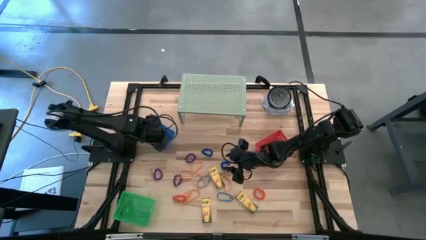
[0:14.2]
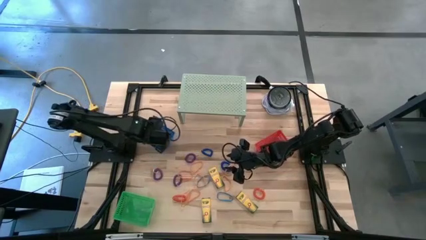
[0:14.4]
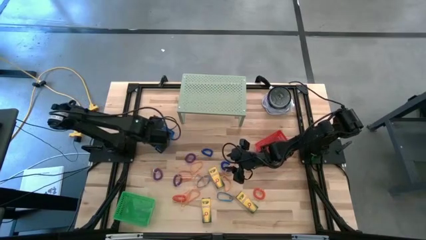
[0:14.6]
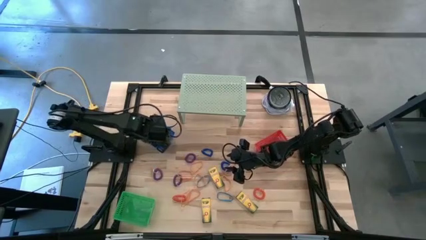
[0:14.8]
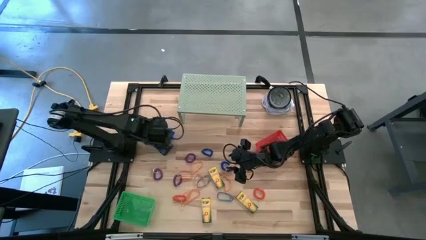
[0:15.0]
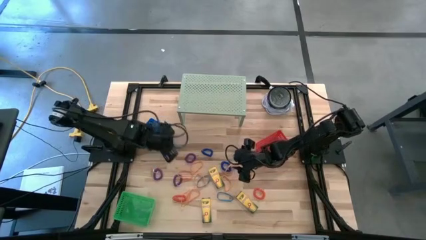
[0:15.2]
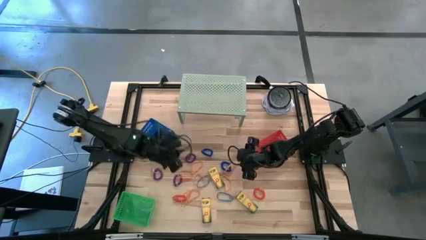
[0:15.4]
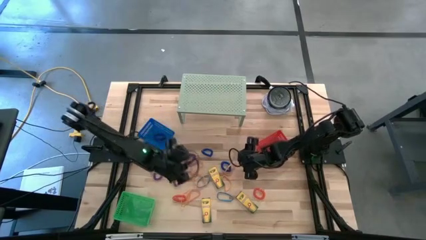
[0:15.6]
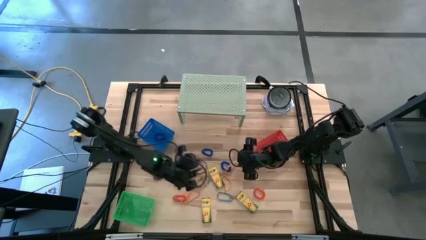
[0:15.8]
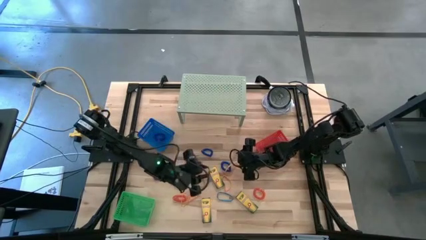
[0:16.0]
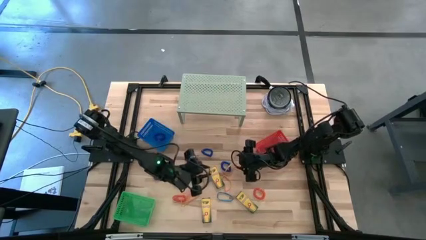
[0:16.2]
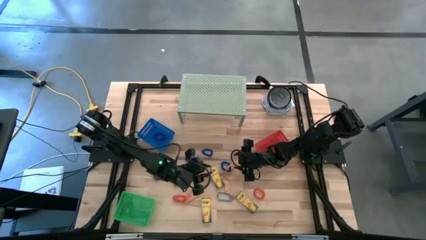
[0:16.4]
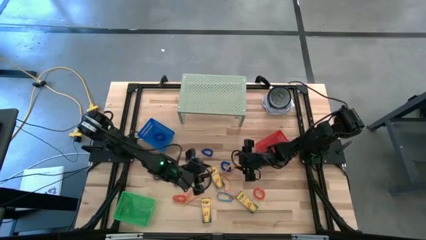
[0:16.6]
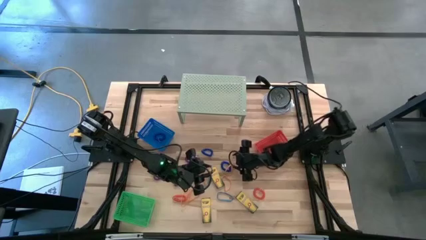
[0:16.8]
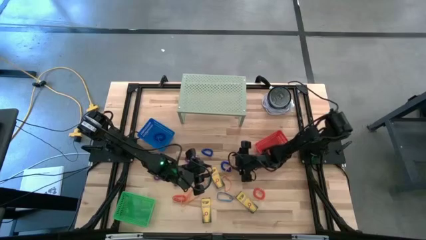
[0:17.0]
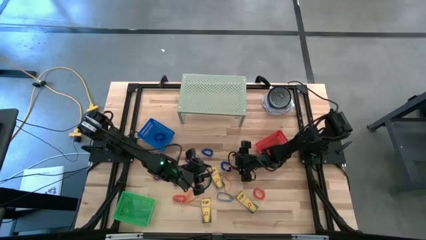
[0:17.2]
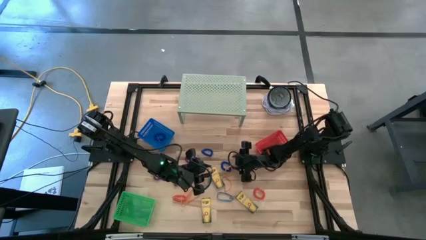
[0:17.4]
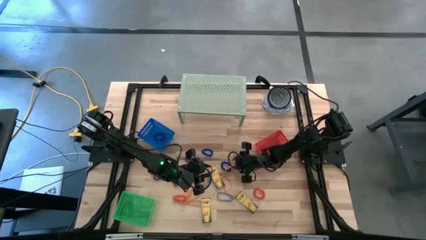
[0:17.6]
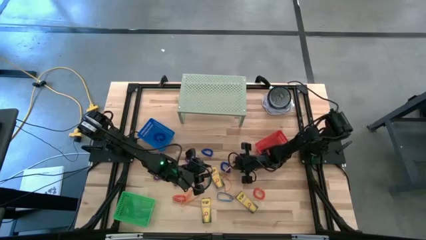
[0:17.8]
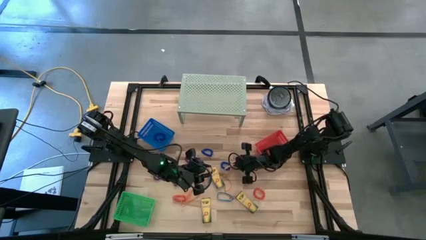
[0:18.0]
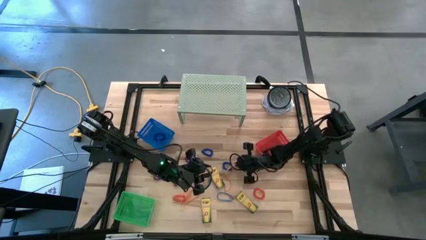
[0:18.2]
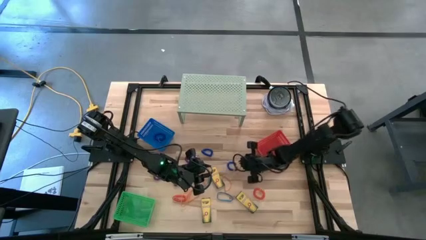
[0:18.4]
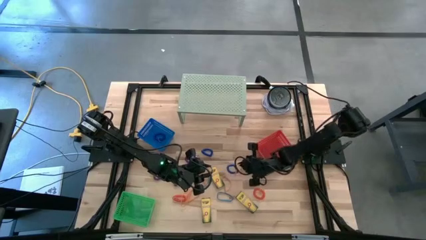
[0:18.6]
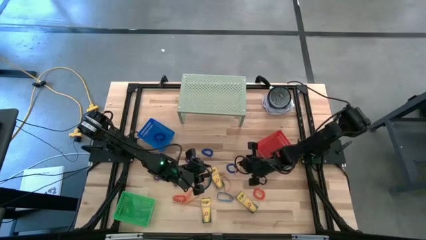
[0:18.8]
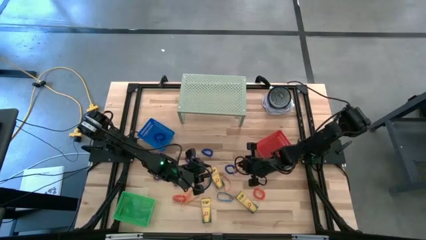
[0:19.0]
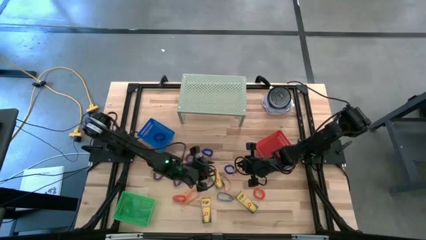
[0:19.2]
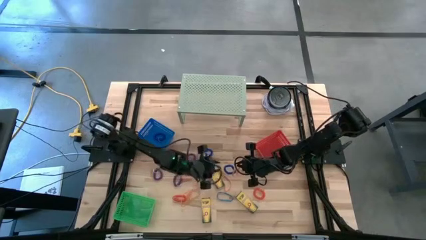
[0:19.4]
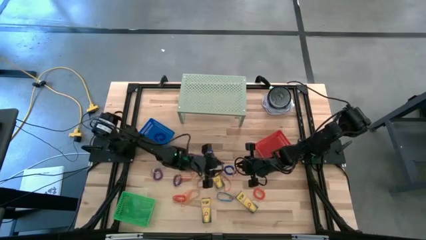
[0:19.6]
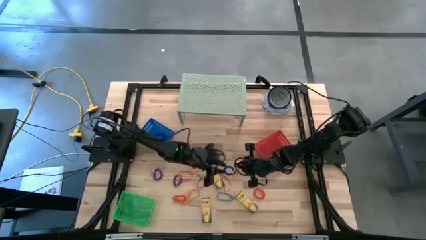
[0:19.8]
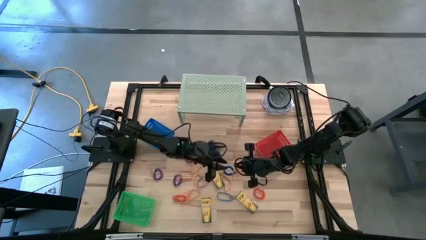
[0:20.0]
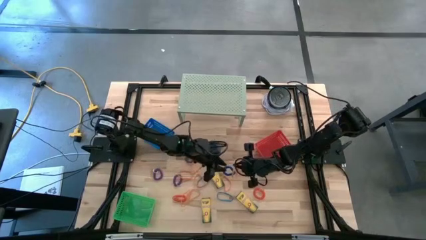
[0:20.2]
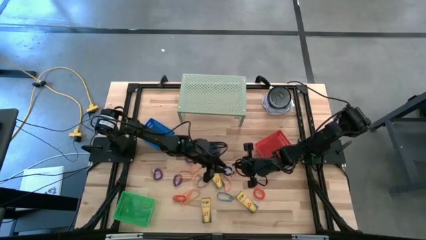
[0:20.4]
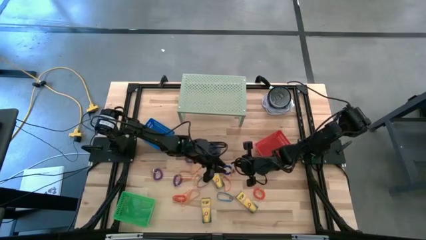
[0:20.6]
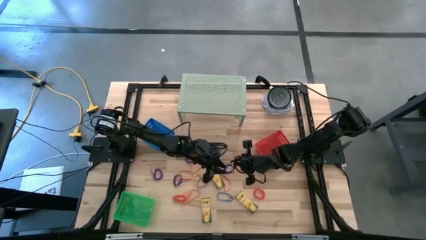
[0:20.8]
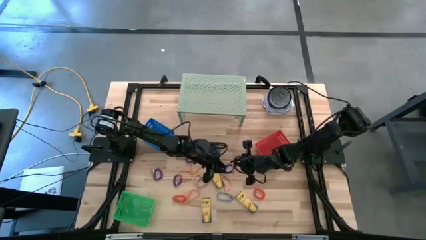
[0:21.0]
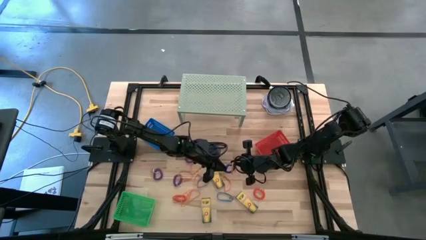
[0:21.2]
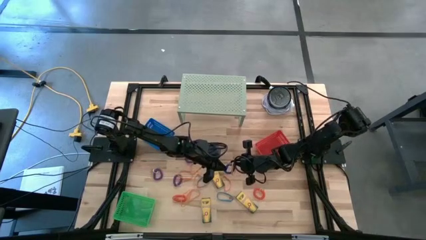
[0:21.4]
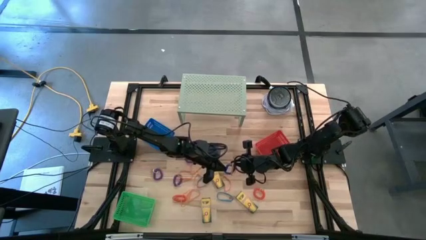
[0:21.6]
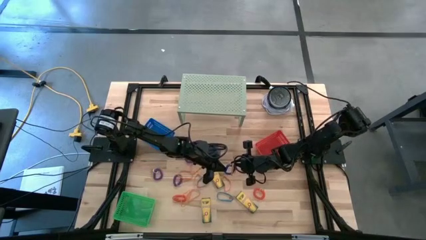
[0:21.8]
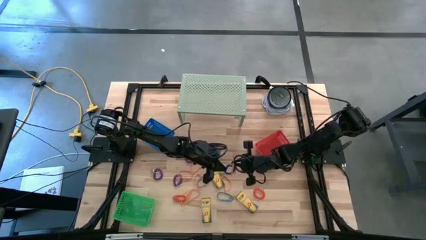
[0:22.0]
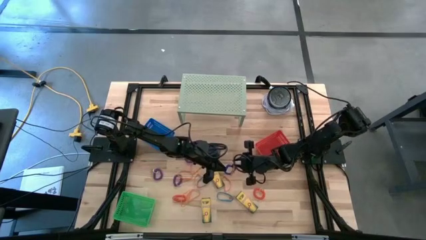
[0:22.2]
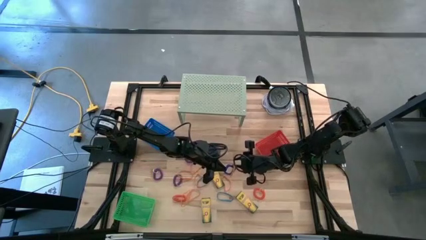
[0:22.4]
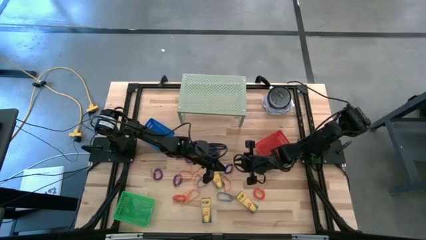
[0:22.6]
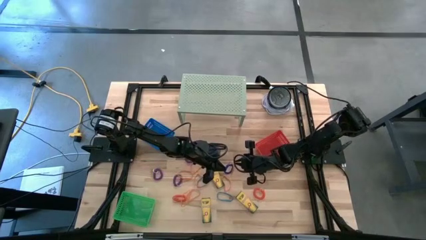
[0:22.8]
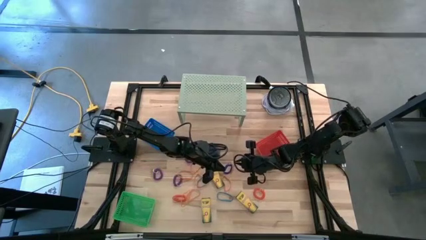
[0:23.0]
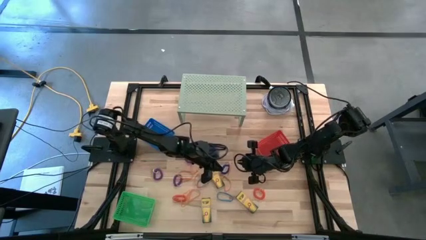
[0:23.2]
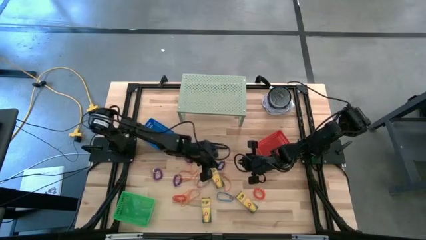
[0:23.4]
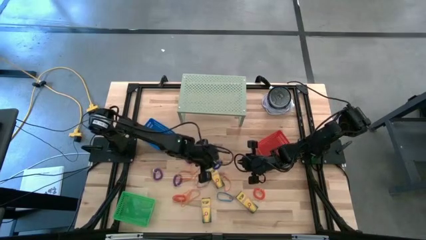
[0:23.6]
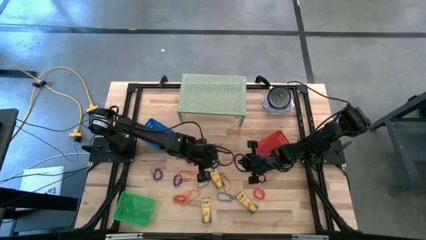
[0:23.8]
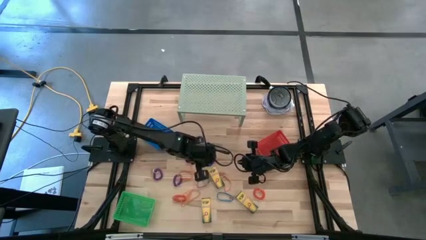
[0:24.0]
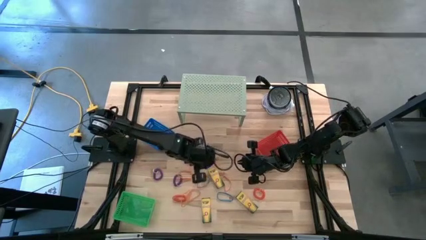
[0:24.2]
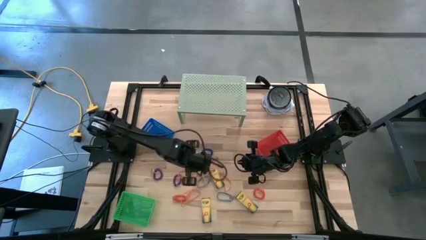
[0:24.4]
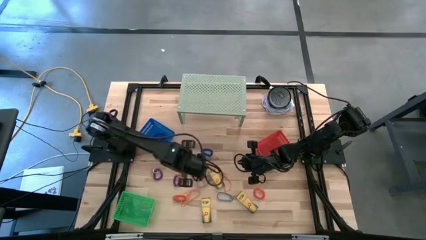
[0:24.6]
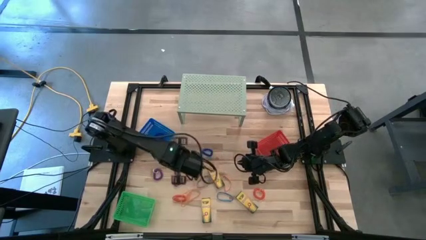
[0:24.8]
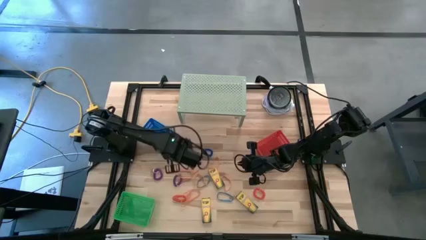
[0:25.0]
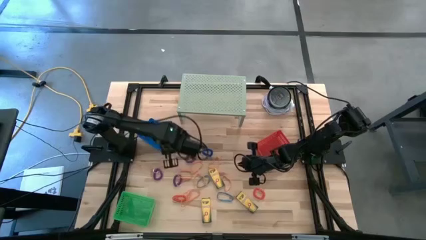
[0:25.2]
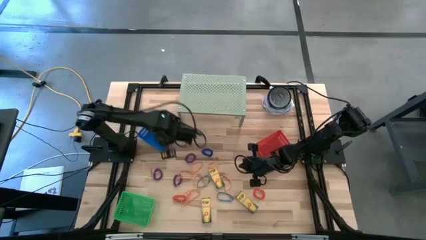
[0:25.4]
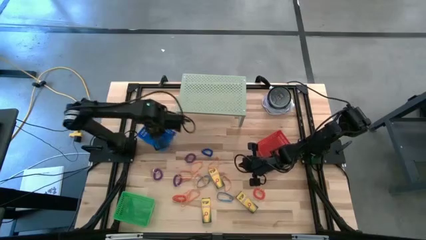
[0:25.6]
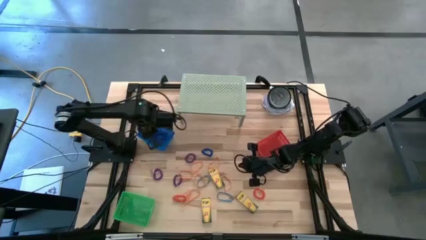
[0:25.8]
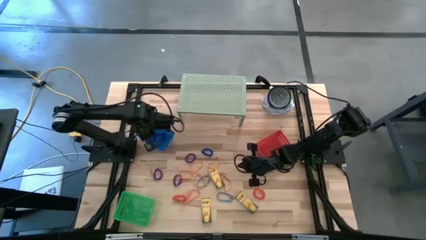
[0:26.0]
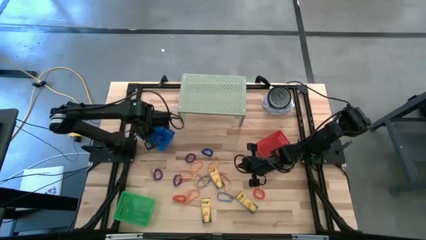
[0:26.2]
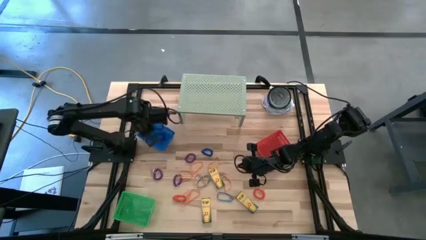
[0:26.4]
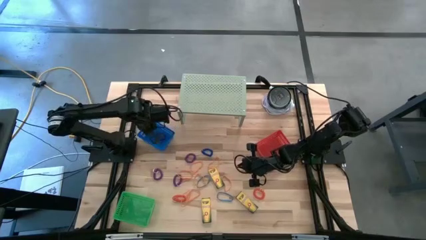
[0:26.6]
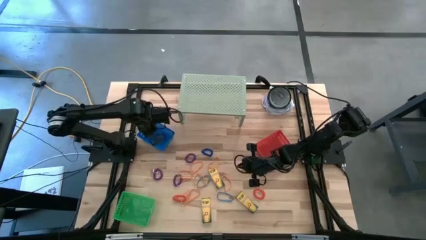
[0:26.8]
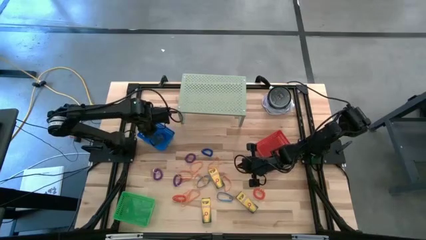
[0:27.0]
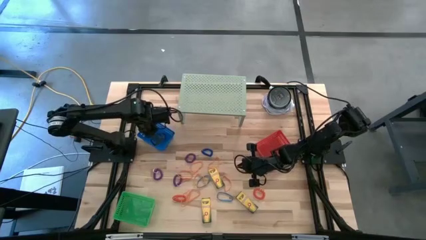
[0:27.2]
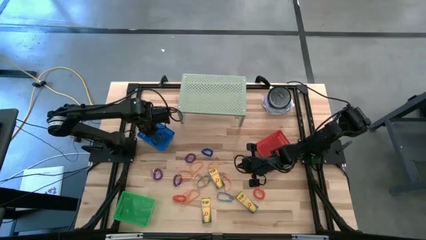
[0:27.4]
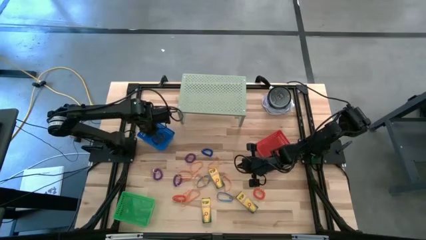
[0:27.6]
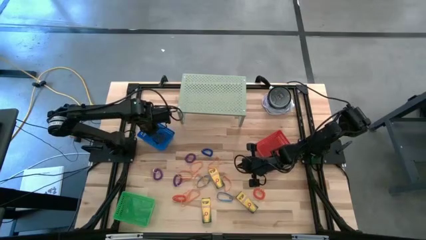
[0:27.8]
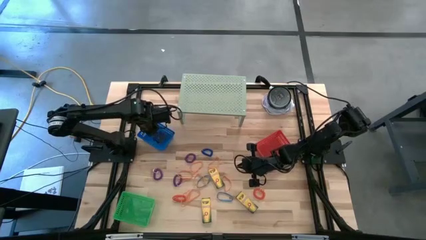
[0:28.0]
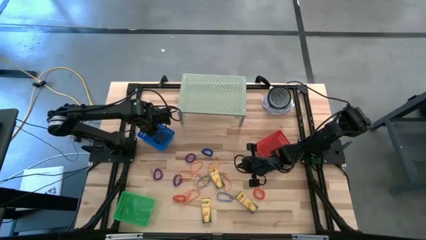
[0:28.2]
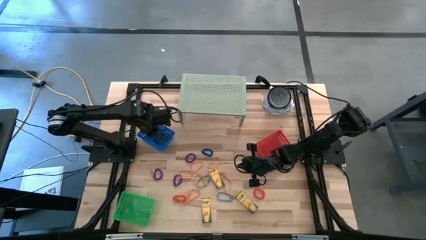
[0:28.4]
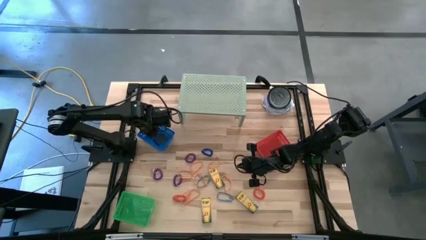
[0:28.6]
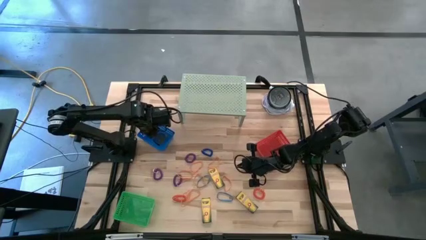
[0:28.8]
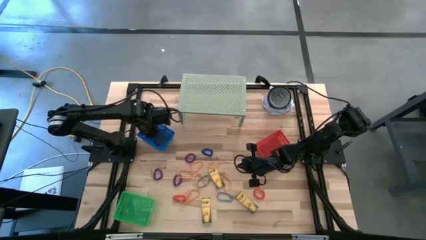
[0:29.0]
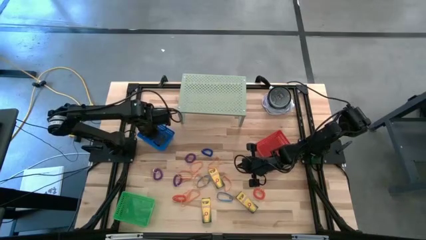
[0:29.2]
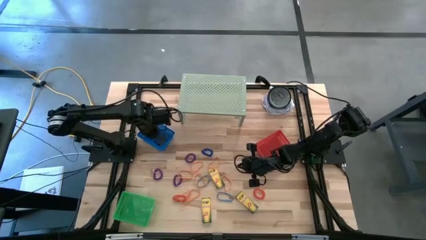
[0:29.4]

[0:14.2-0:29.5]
Task: Pick & Place Office Desk Supplies
Put the blue spring keychain into the blue bin

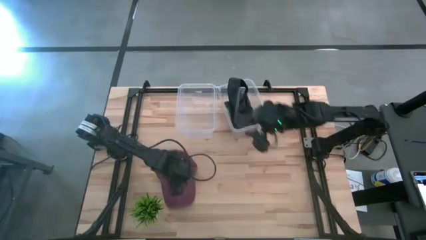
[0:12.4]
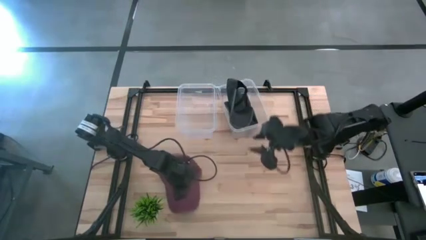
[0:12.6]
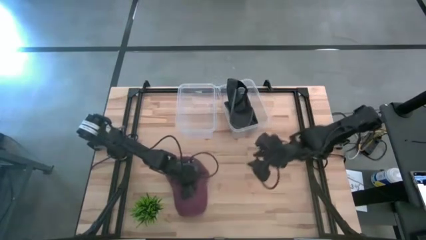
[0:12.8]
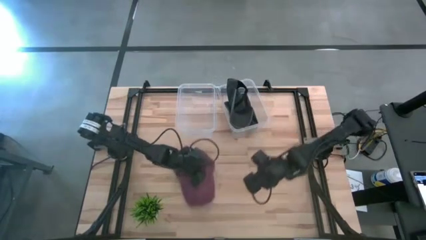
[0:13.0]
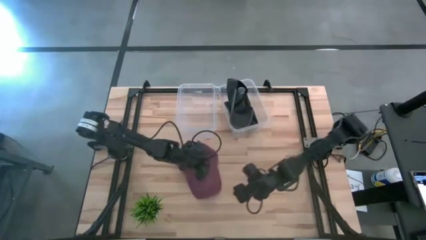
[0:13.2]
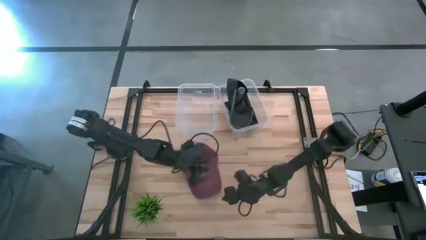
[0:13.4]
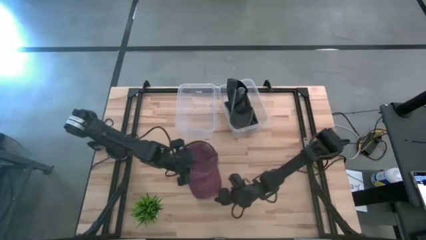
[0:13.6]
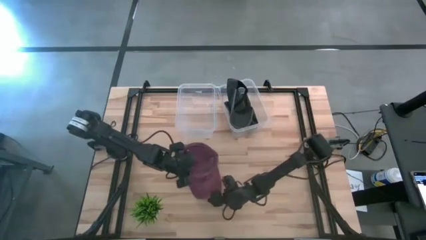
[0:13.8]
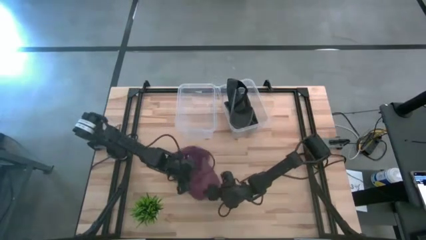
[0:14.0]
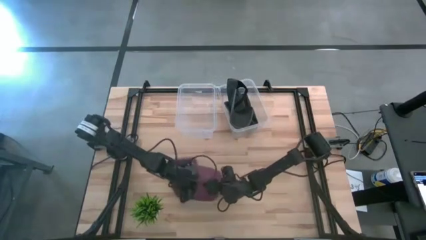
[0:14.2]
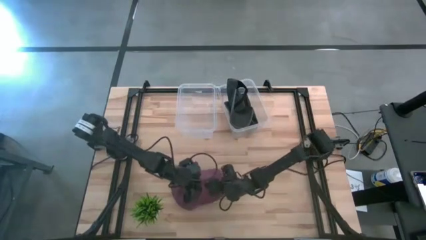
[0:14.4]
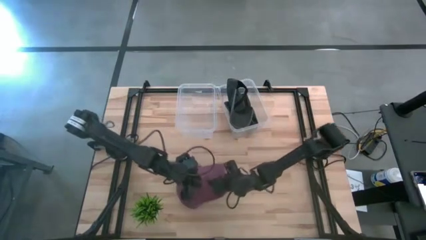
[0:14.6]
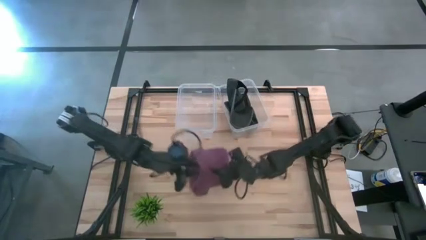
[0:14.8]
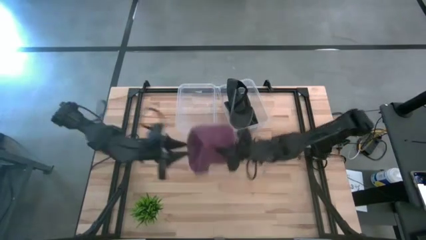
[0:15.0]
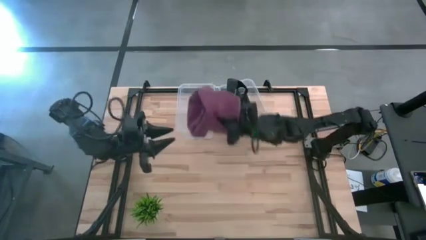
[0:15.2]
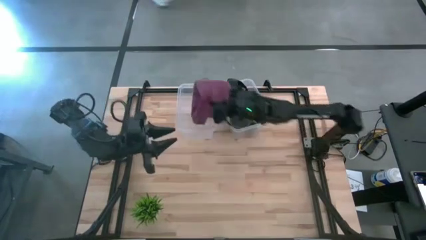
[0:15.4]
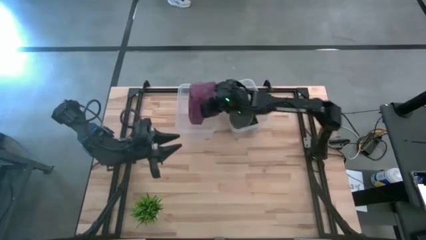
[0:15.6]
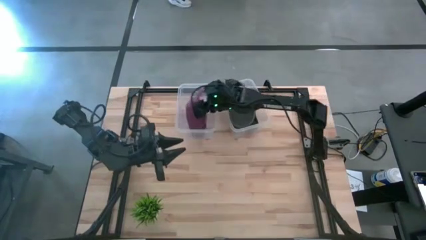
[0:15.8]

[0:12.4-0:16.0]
Task: Pick & Place hat
Put the red cap into the left transparent bin
